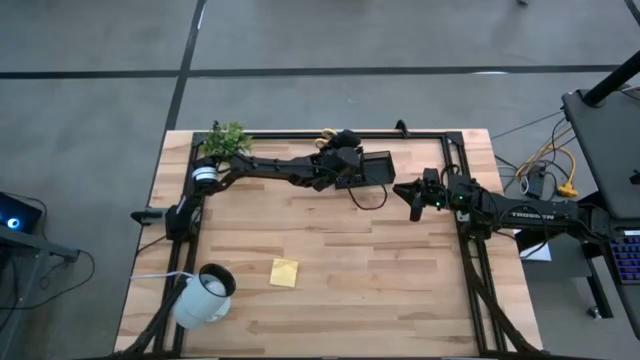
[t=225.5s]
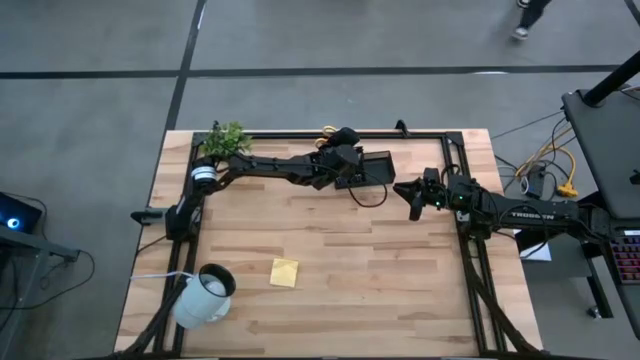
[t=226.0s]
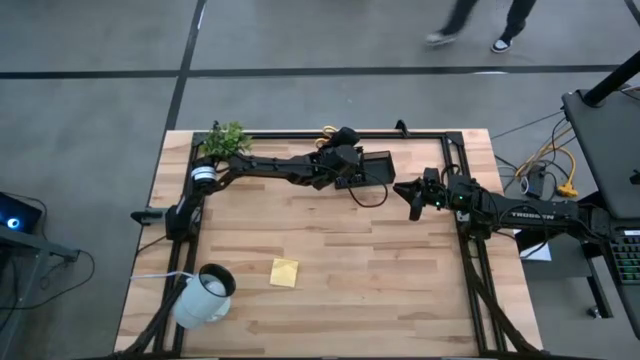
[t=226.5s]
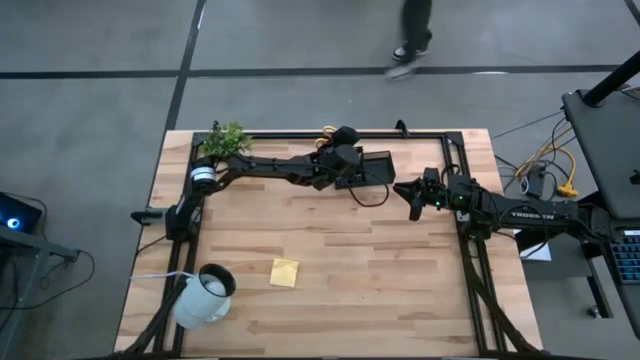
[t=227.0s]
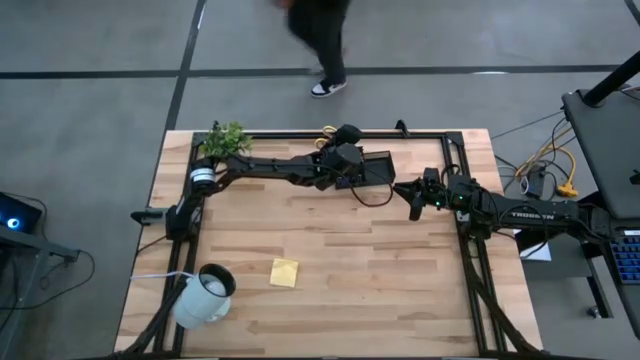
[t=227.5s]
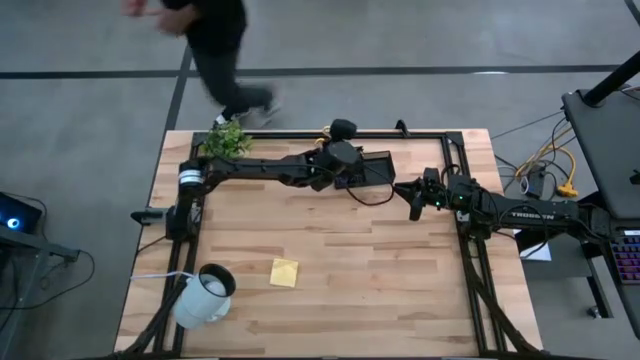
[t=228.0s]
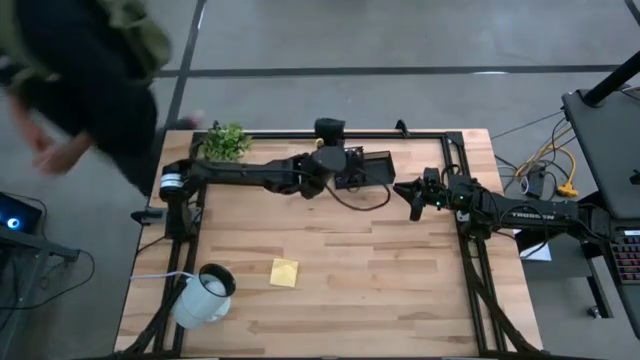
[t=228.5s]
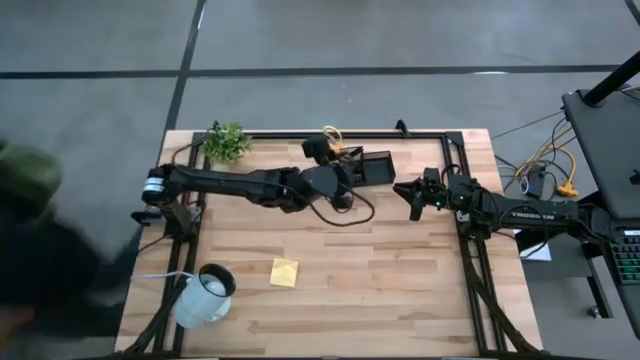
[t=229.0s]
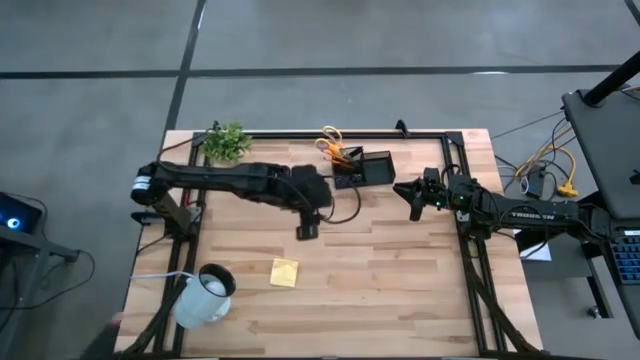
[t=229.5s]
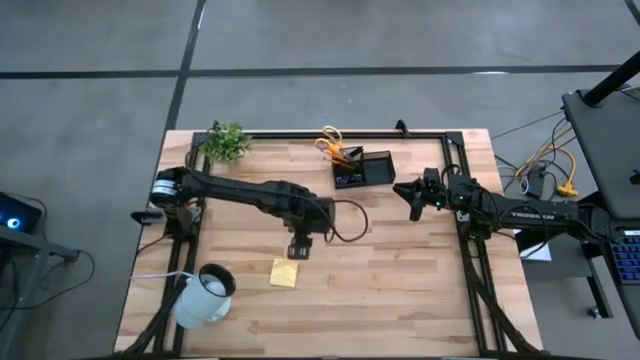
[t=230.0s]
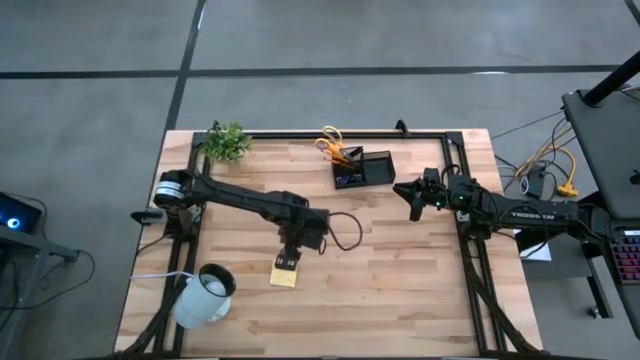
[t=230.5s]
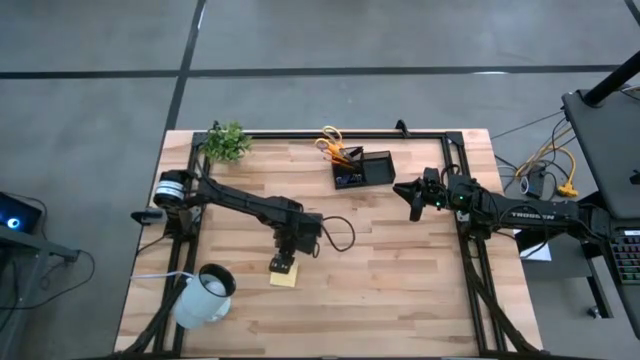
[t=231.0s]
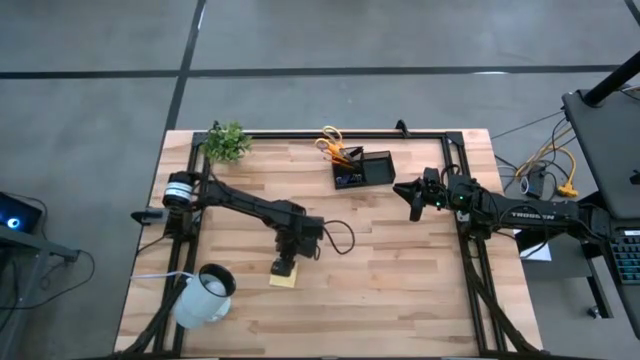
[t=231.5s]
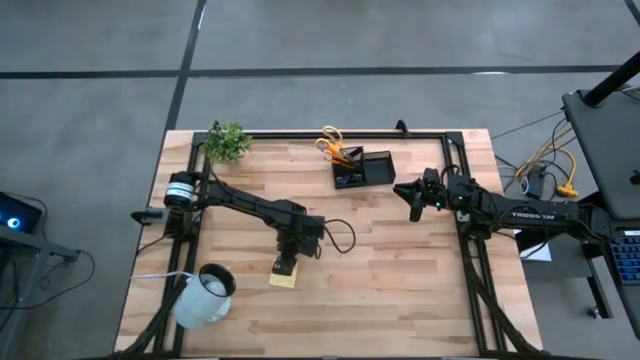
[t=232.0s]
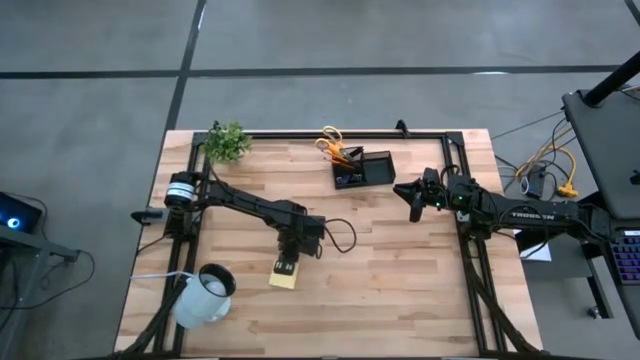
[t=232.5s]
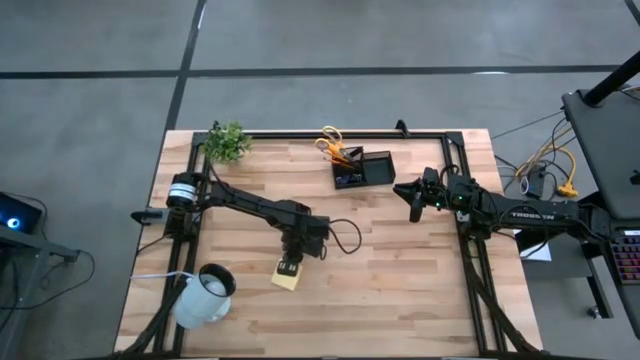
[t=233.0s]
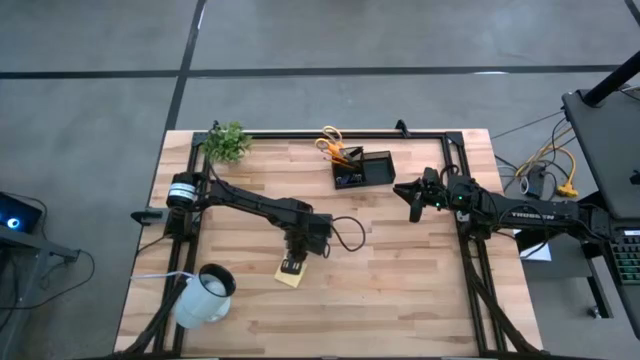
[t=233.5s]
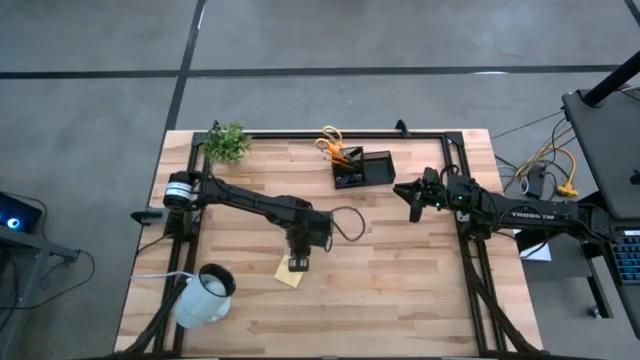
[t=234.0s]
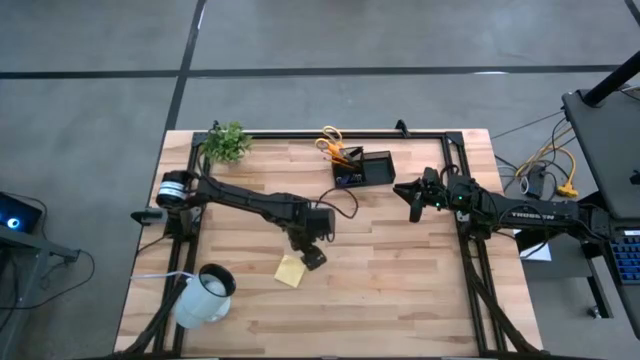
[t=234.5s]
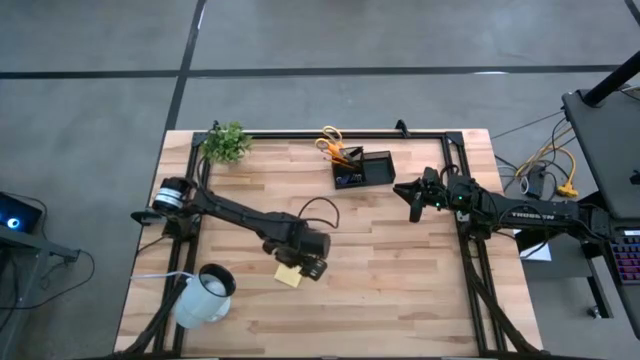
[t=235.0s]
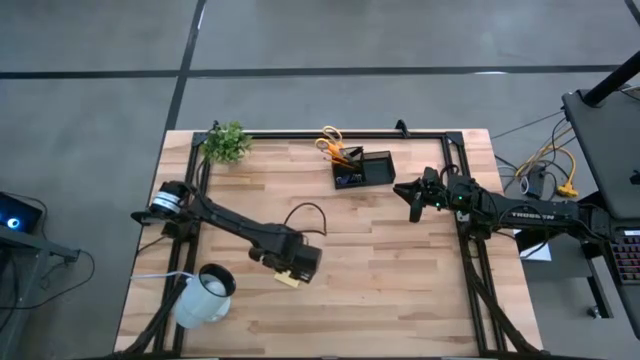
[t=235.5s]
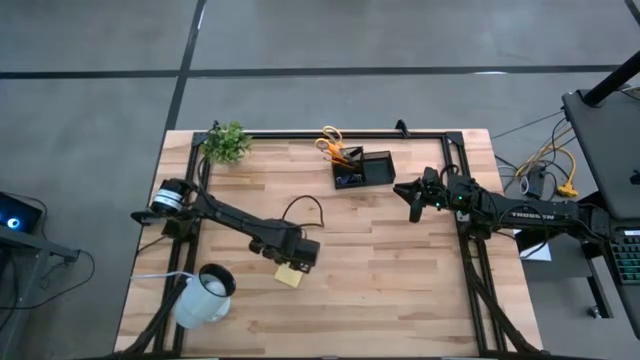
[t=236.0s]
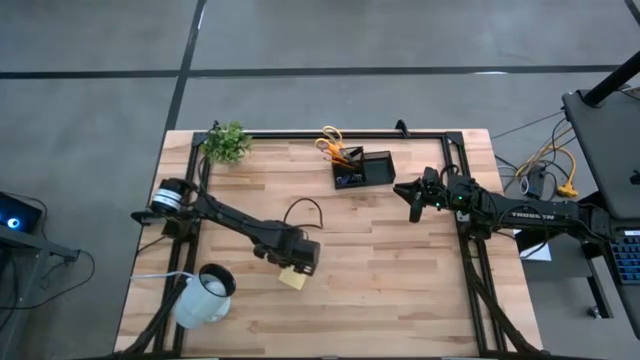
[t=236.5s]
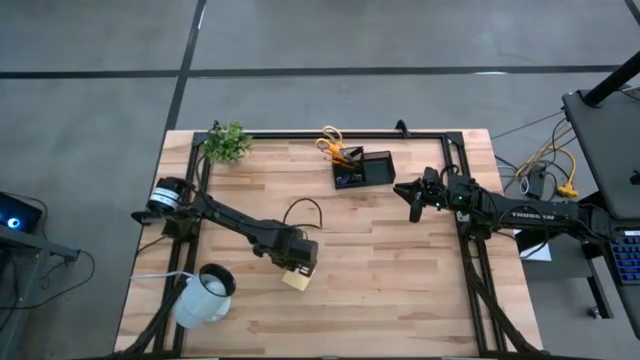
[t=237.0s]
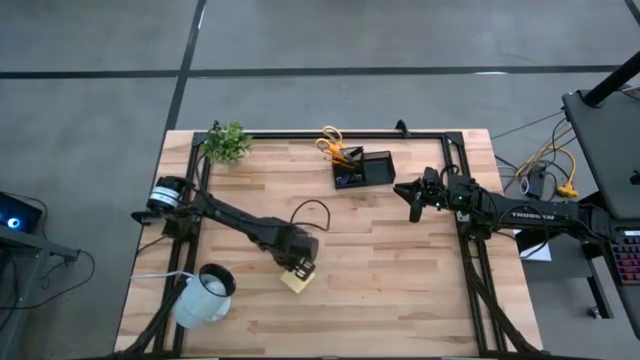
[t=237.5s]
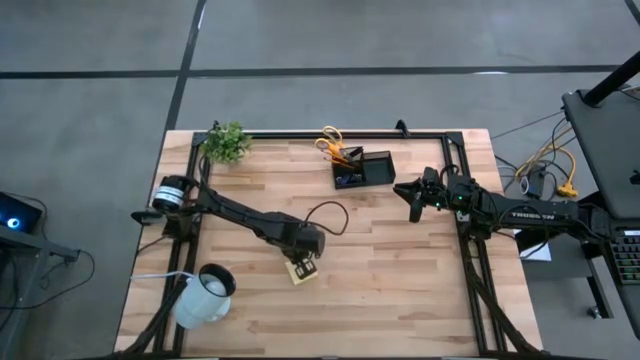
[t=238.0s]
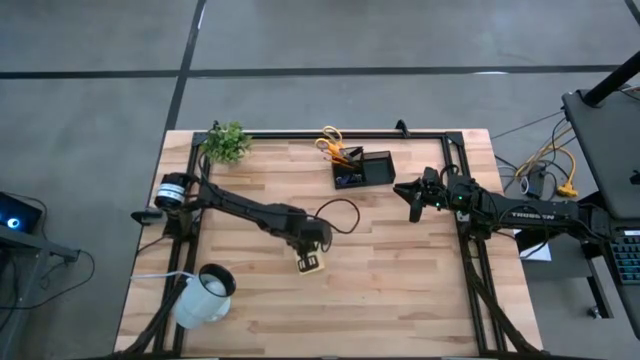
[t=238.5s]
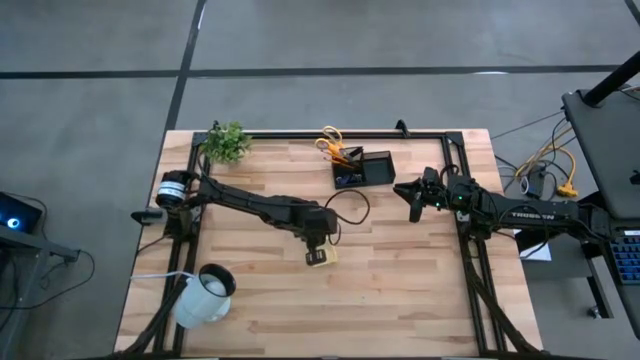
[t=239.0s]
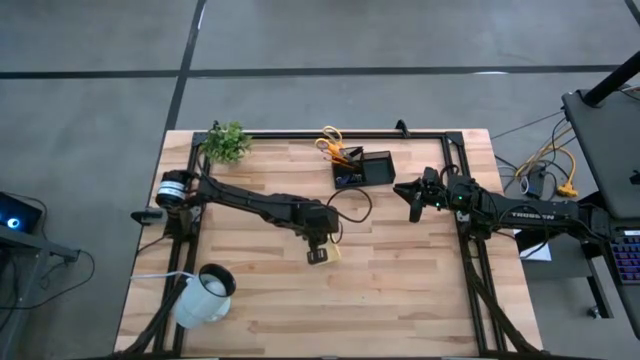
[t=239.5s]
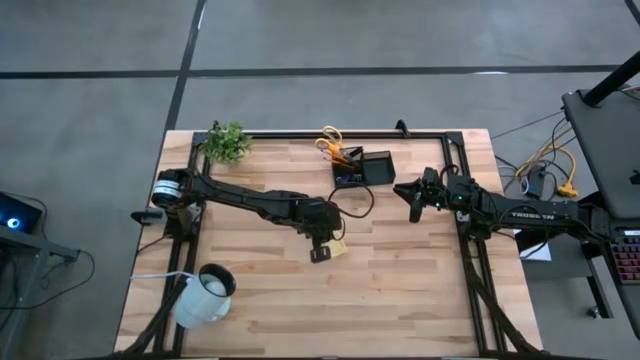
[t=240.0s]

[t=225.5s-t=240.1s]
Task: Pick and place office supplies into organizer
Put the sticky note into the desk organizer

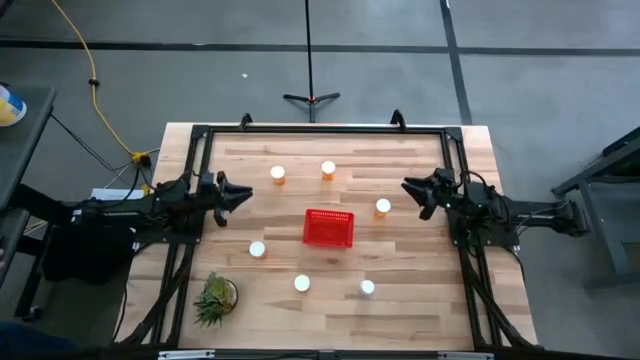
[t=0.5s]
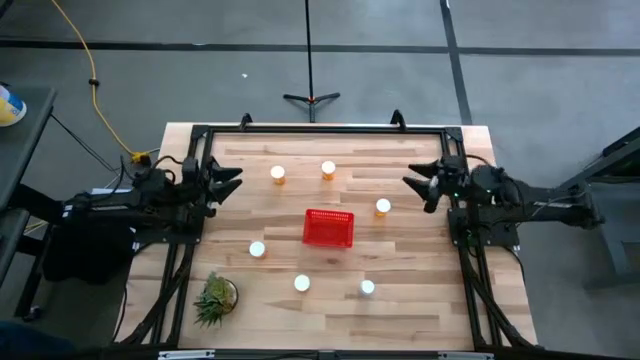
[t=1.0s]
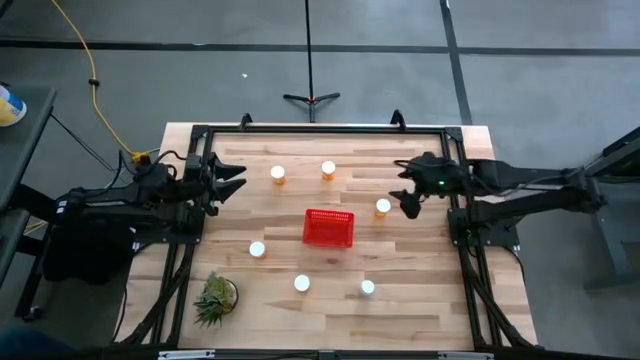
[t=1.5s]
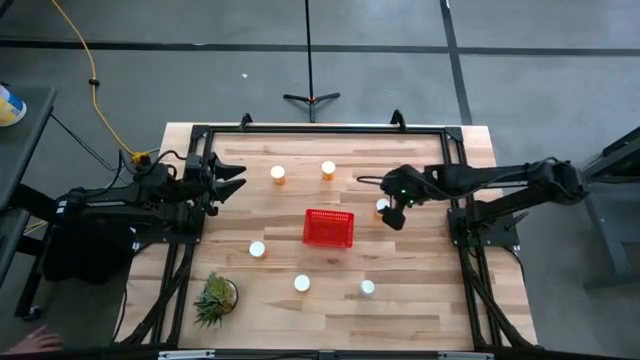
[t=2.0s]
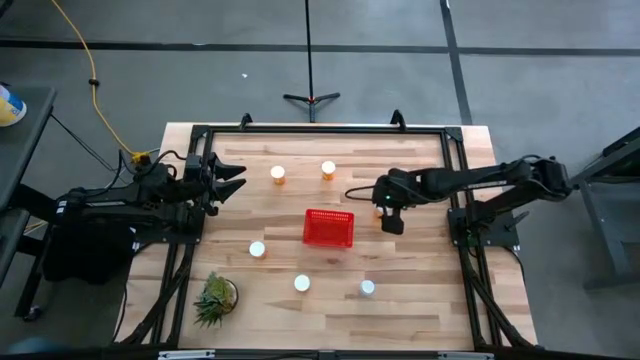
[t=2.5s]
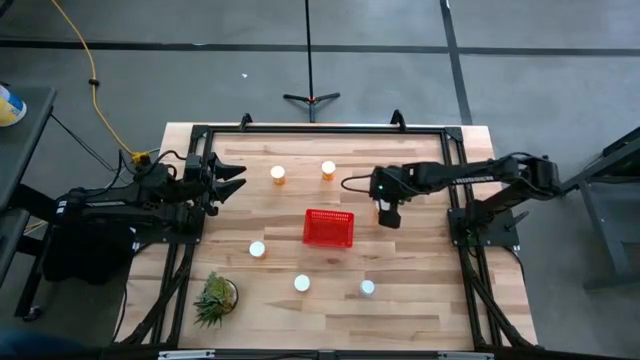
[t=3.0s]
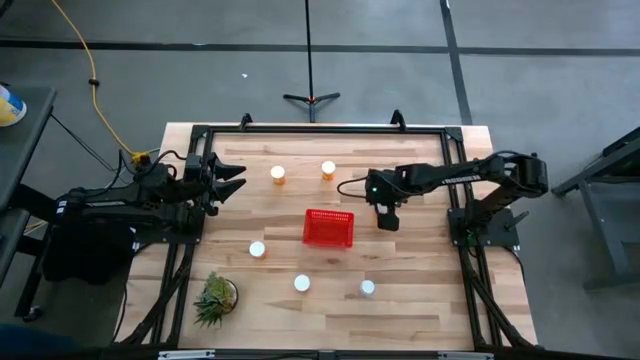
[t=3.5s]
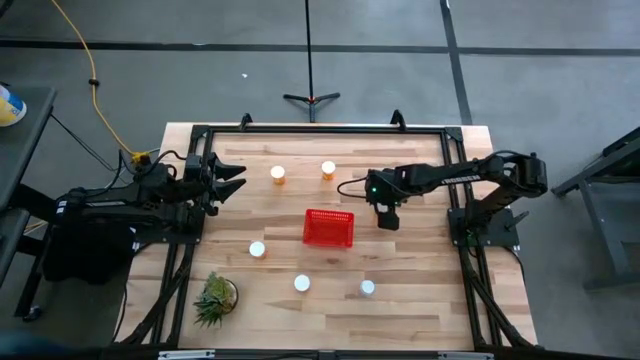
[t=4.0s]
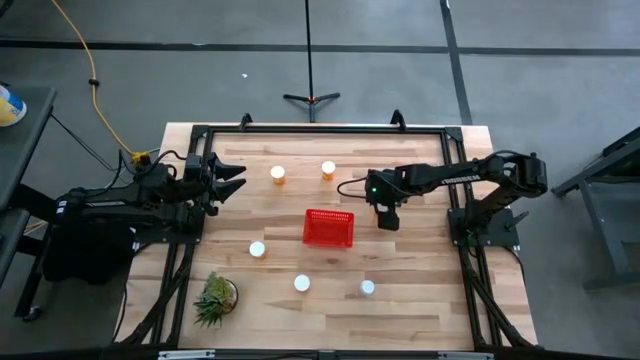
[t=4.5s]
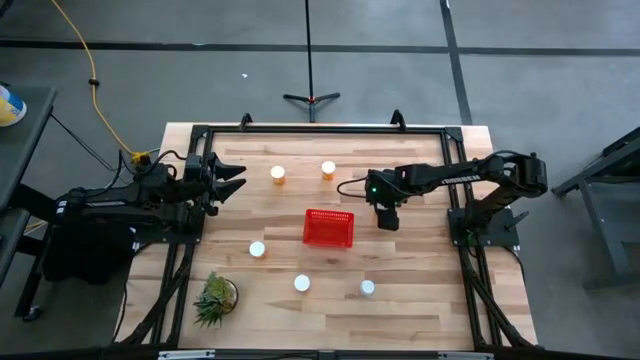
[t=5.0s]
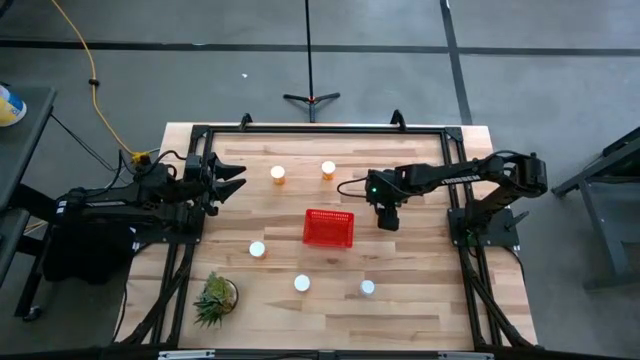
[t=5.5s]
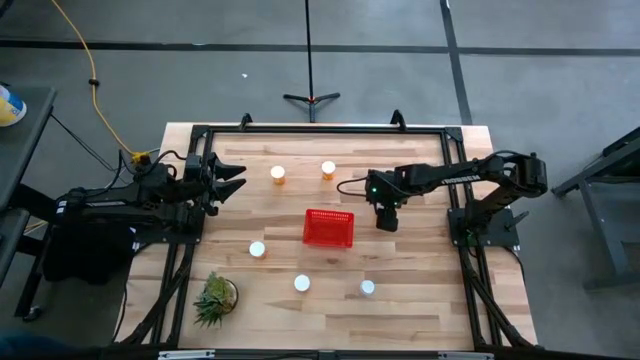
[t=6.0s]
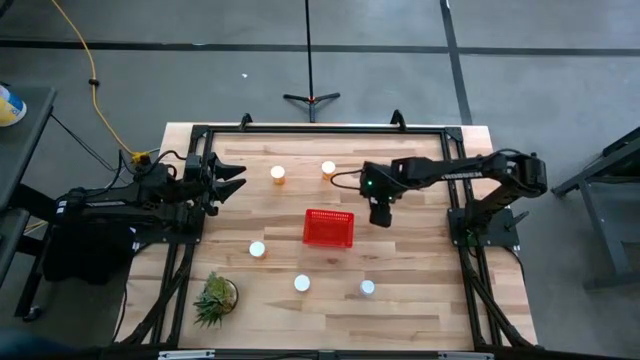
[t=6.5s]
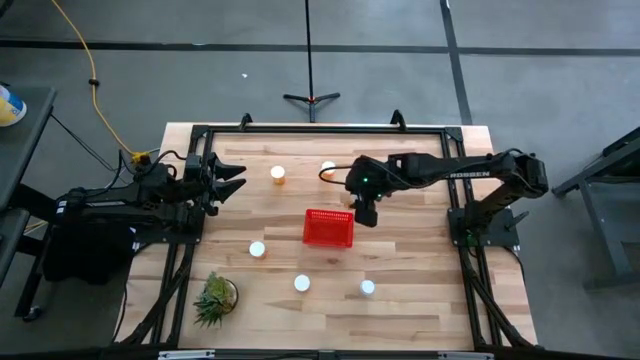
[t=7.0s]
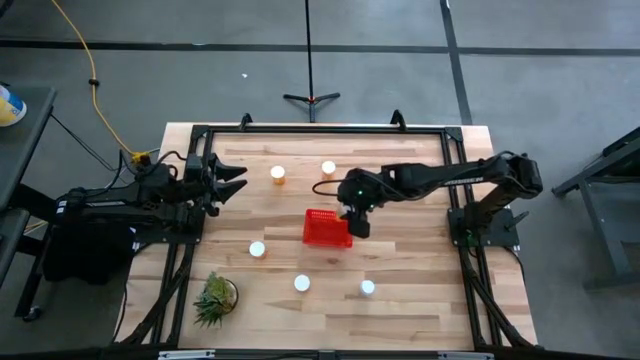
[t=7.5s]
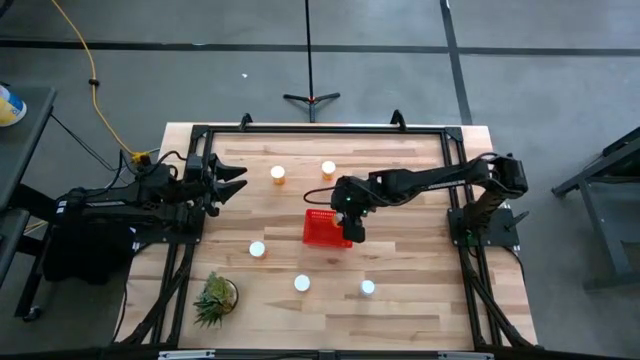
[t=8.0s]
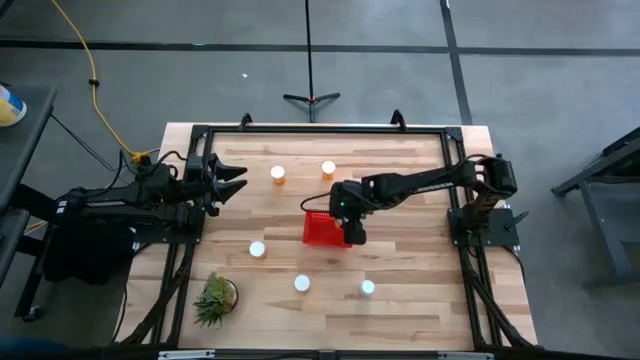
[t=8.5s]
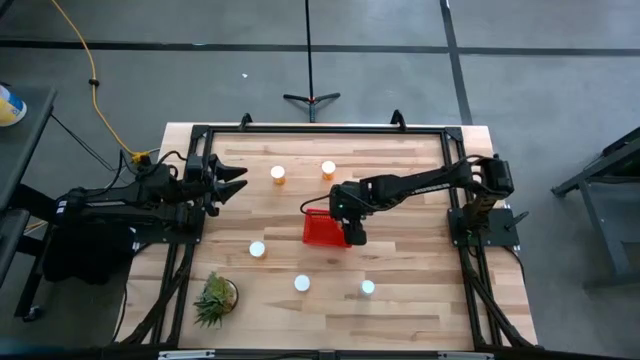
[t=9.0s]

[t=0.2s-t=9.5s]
Task: Pick and place pill bottles into a basket
Put the orange pill bottle into the red bin
